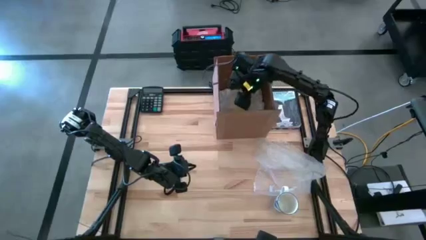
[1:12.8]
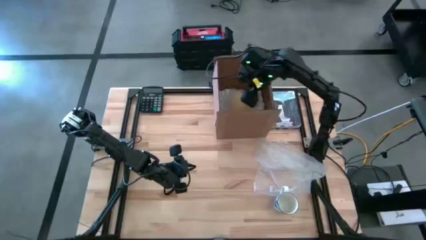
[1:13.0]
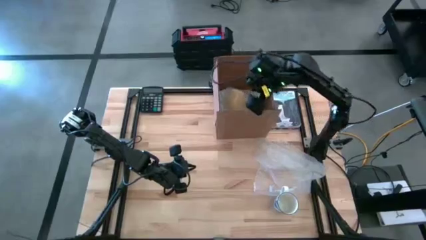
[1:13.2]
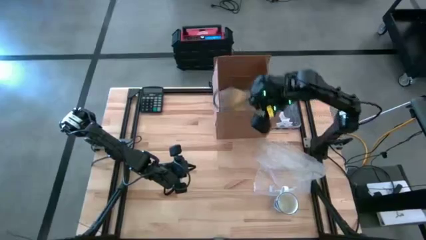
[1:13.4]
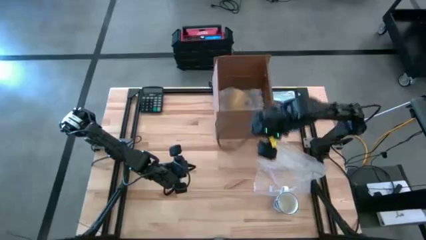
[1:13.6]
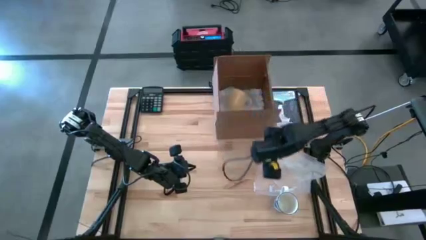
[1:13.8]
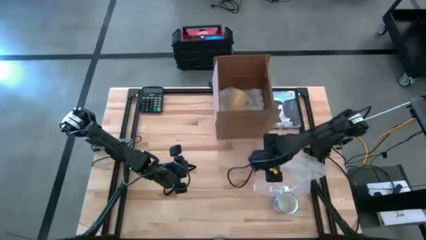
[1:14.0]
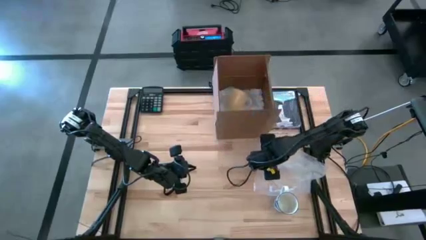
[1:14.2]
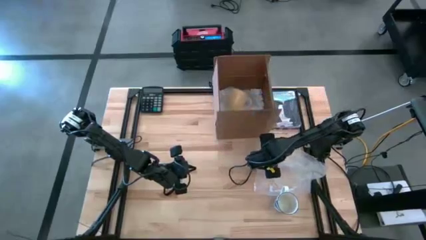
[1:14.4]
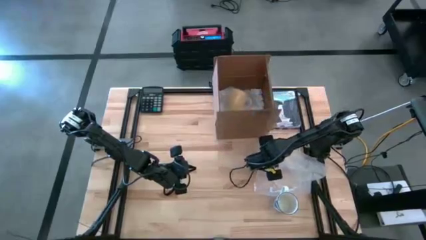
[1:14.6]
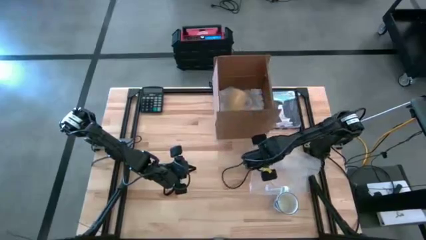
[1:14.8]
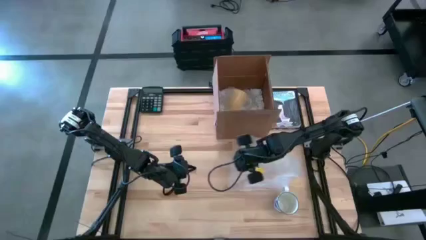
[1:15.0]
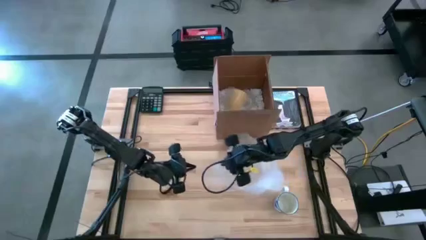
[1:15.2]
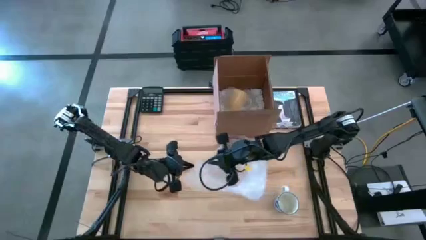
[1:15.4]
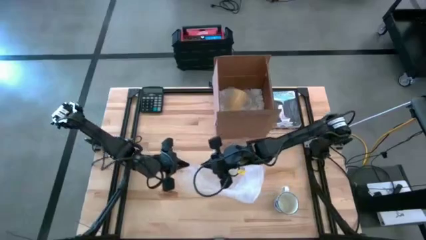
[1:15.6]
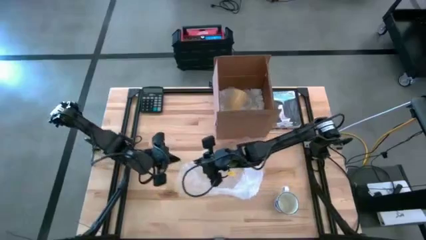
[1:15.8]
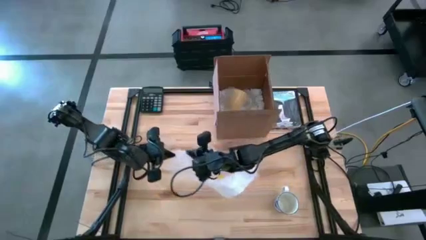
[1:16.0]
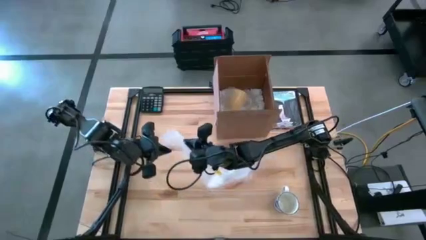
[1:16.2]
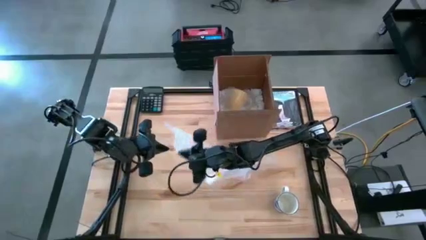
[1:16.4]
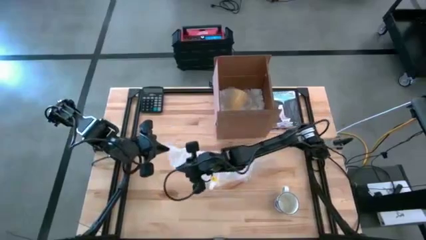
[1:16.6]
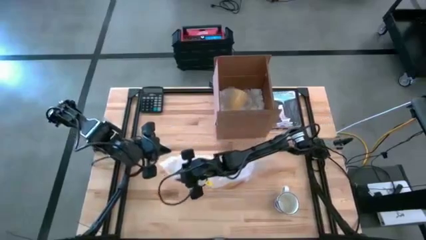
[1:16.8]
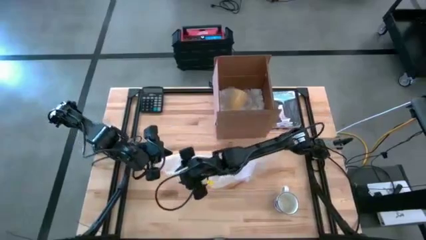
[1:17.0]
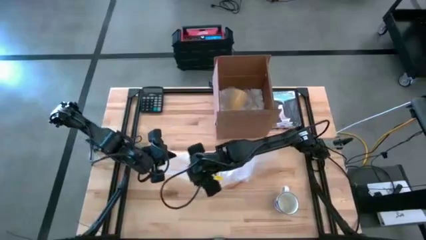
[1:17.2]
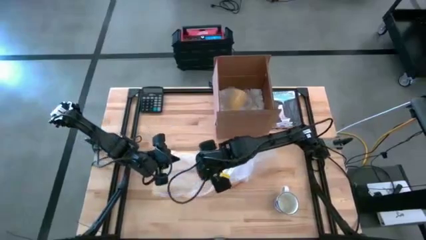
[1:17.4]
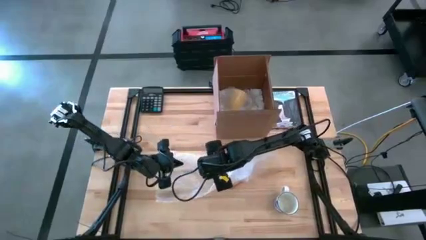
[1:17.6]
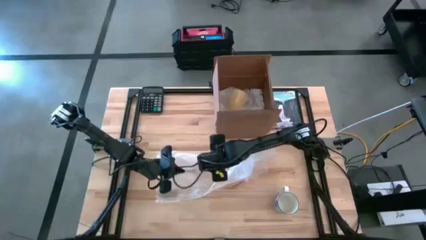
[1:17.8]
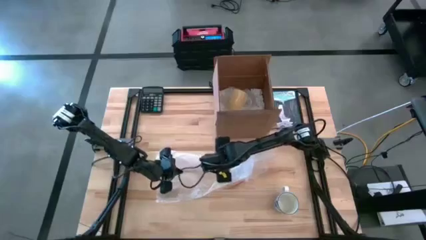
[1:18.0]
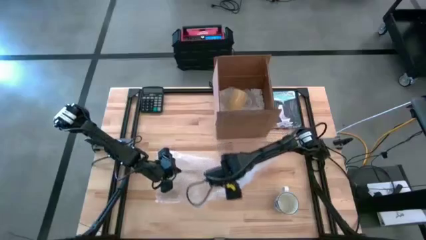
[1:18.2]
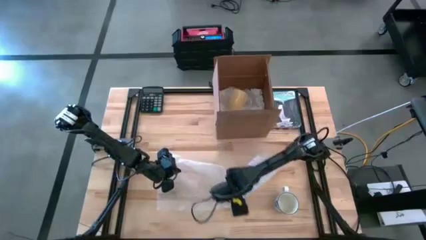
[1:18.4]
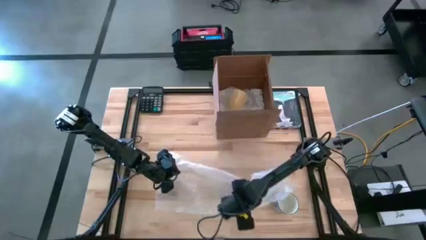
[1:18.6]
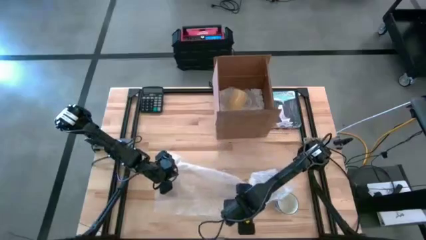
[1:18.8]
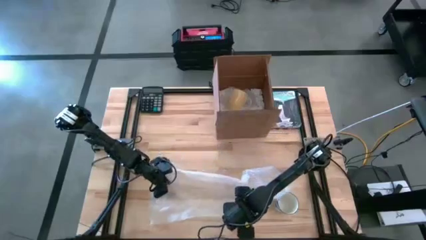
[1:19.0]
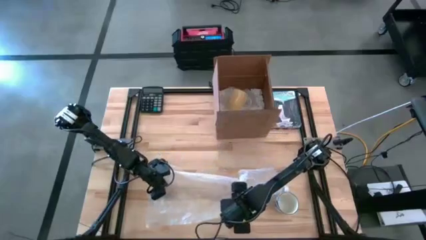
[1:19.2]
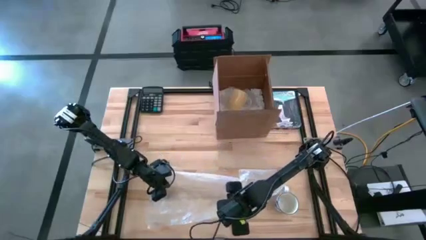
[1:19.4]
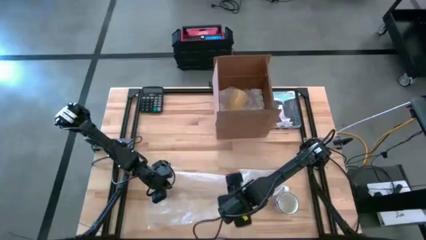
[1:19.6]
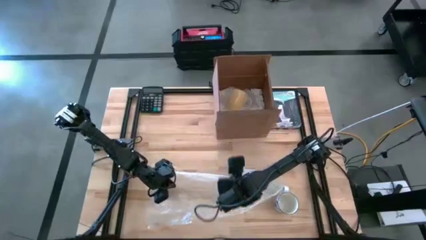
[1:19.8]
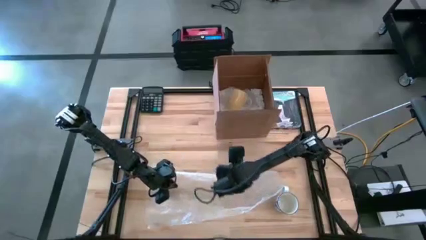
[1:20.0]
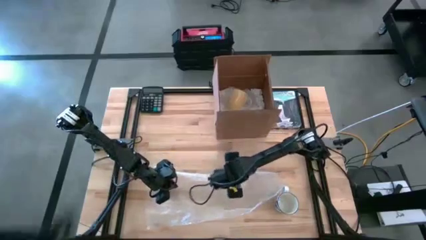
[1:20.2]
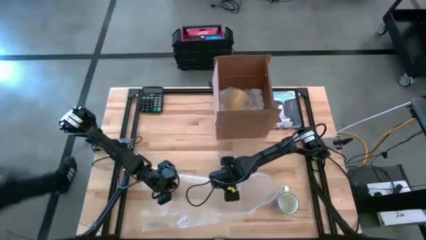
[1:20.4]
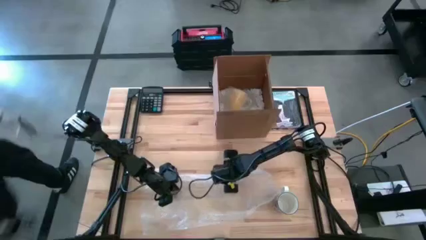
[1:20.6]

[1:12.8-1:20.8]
Task: wrap mug
Prepare the transparent bubble wrap

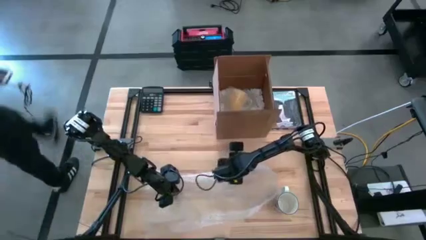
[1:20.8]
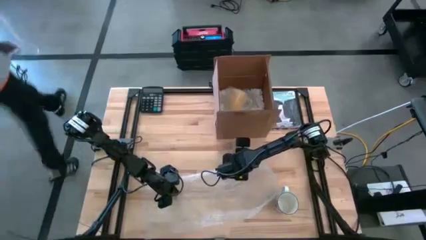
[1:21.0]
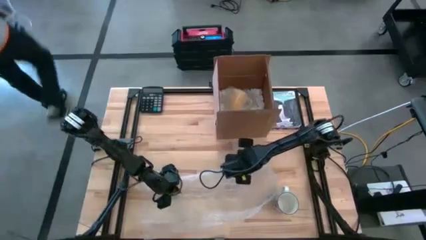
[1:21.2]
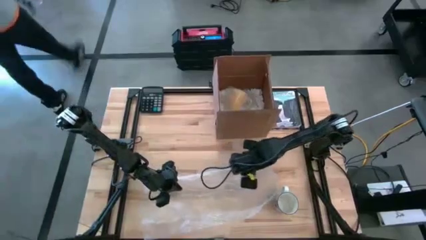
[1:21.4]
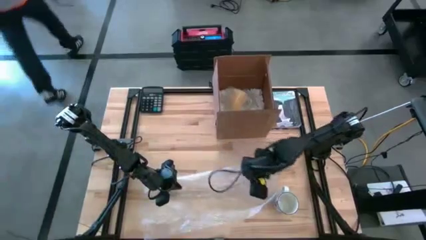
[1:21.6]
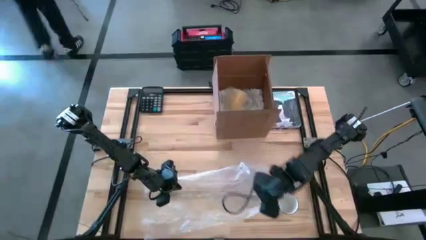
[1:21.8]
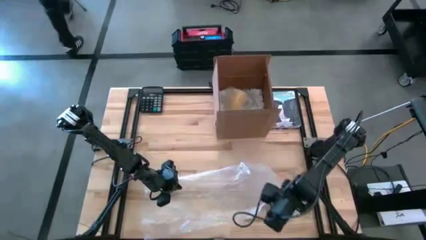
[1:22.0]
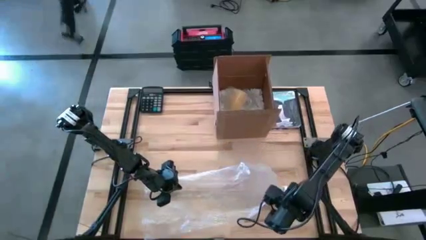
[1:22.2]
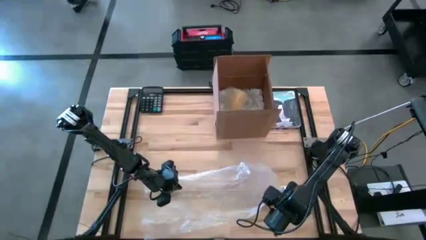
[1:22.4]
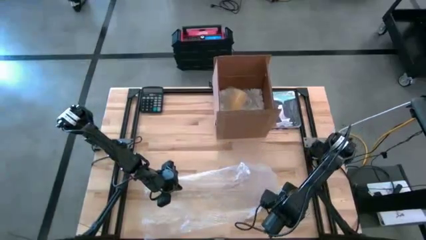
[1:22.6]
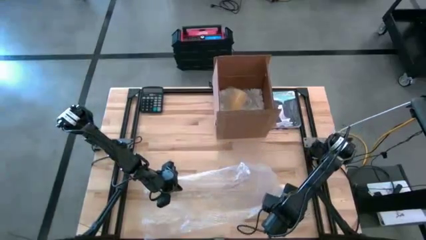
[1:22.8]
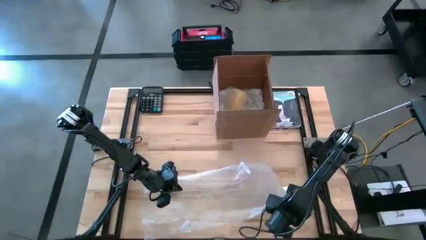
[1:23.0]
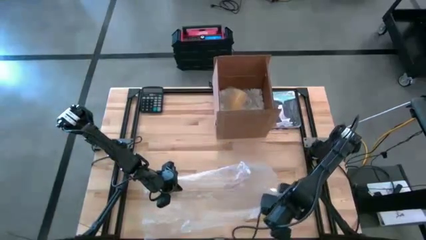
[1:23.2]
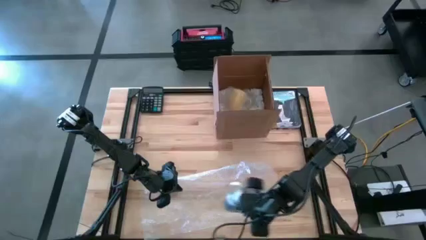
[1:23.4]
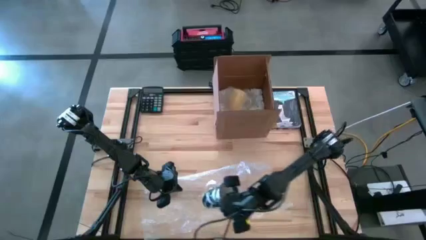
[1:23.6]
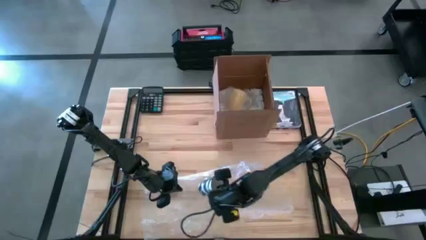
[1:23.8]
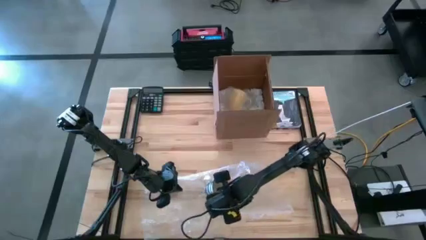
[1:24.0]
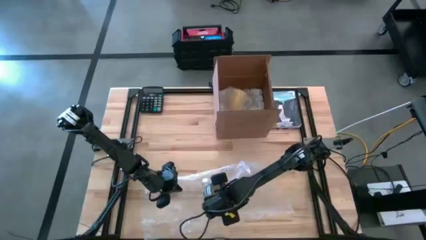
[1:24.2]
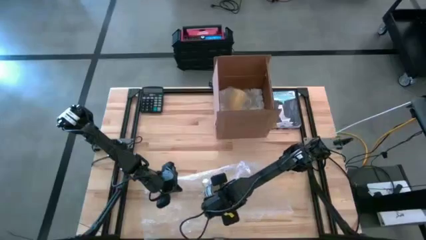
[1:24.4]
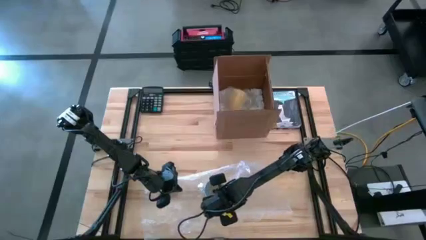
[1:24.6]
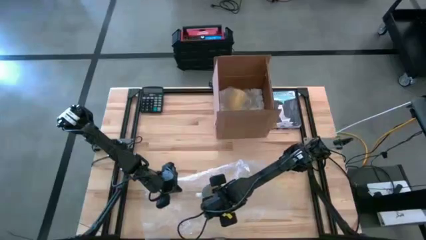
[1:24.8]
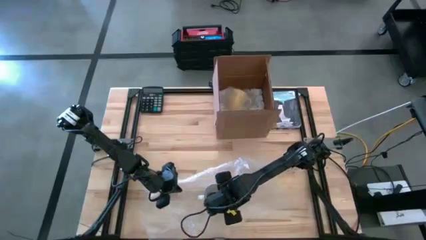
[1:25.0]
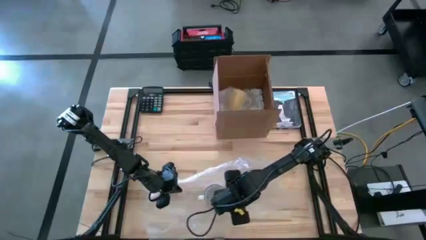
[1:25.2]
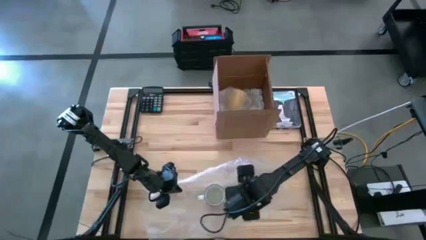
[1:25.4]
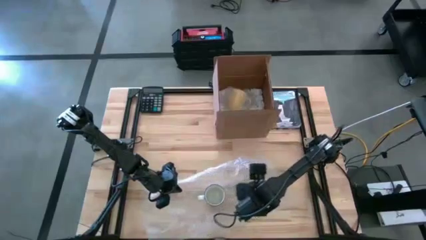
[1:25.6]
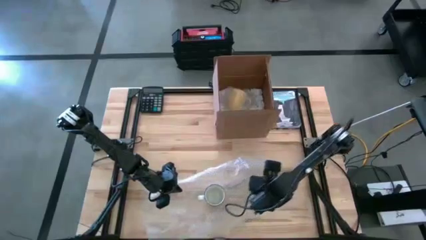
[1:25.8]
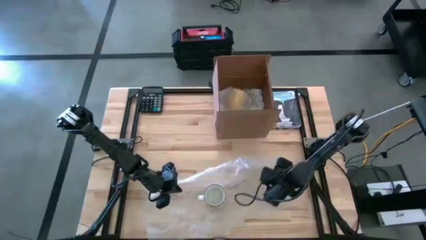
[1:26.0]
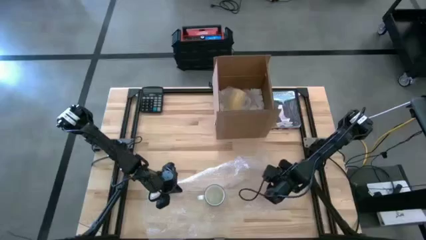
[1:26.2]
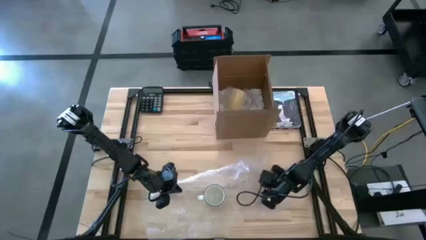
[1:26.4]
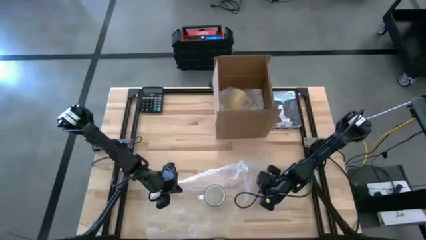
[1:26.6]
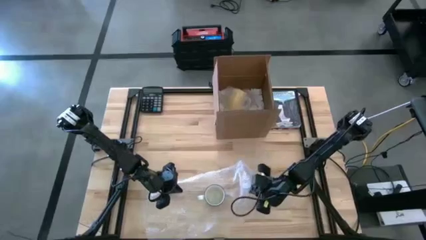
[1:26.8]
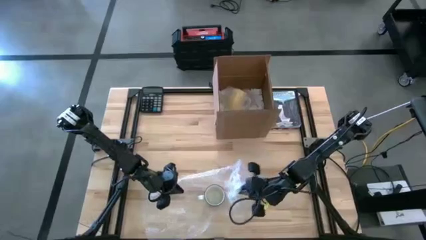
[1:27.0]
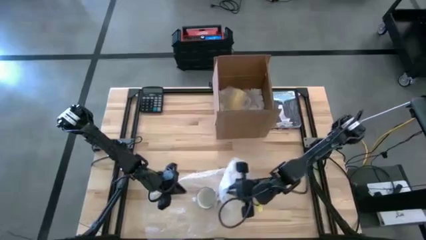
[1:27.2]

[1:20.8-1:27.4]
Wrap the blue patterned mug with the transparent bubble wrap
